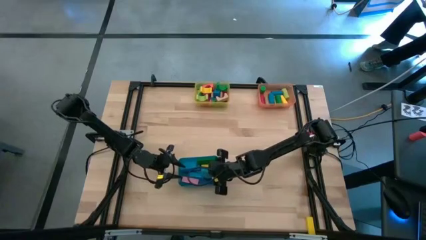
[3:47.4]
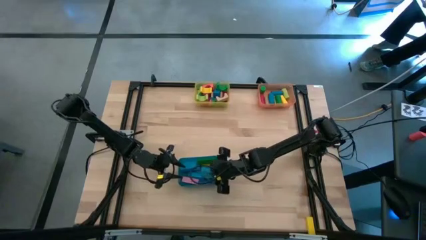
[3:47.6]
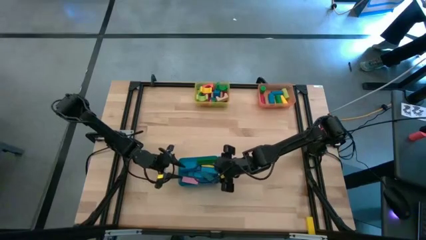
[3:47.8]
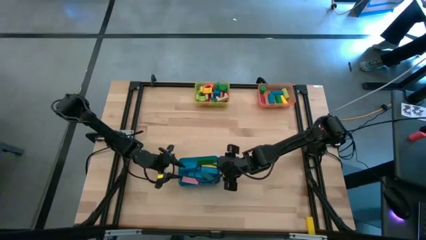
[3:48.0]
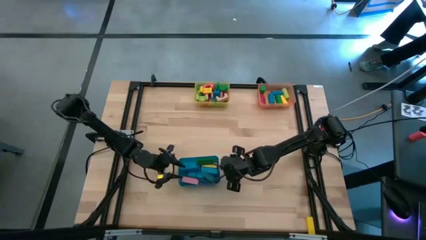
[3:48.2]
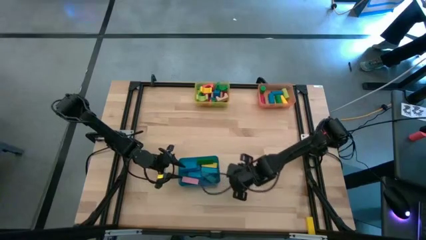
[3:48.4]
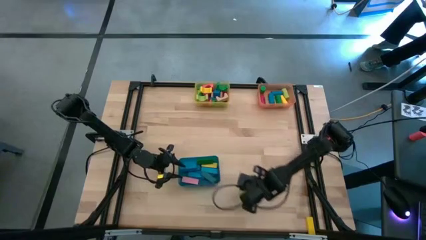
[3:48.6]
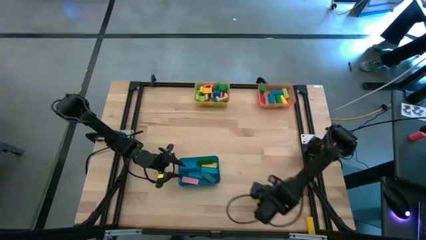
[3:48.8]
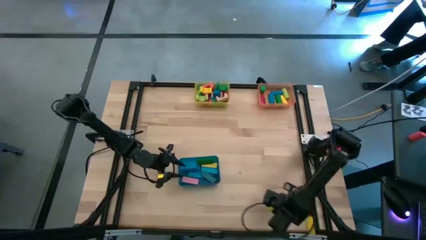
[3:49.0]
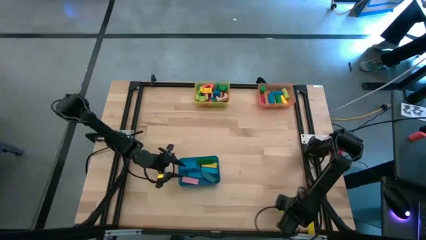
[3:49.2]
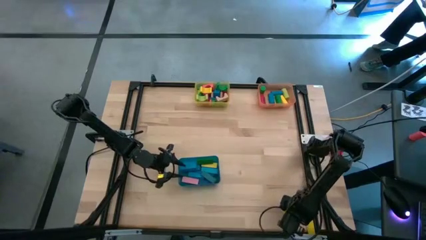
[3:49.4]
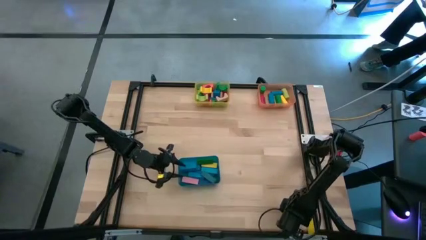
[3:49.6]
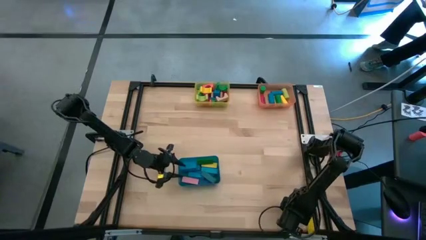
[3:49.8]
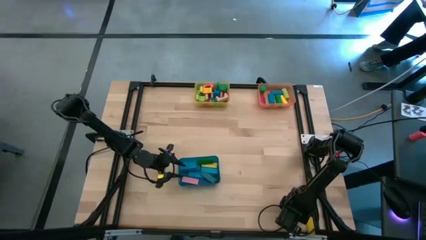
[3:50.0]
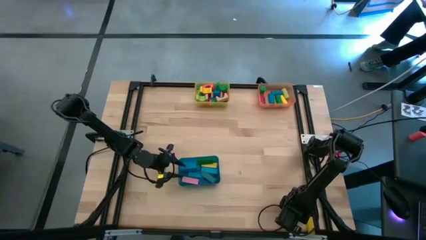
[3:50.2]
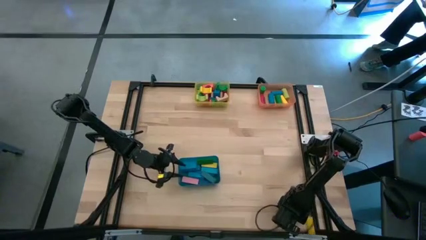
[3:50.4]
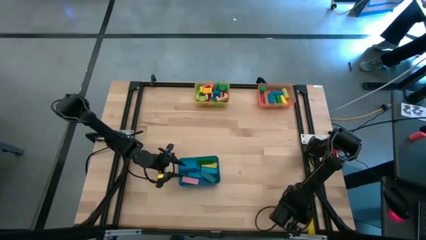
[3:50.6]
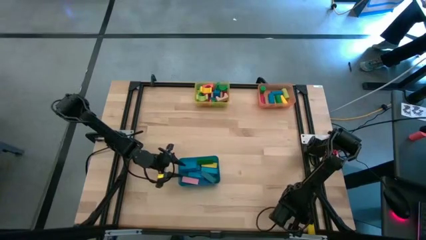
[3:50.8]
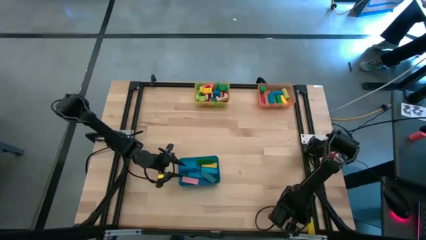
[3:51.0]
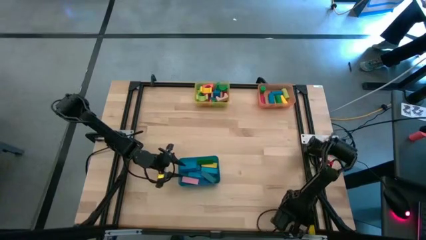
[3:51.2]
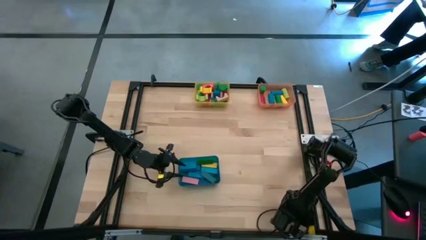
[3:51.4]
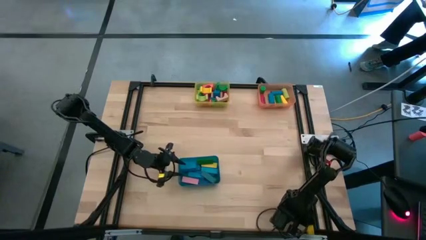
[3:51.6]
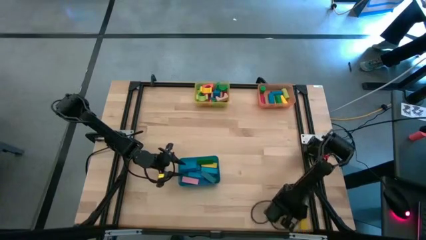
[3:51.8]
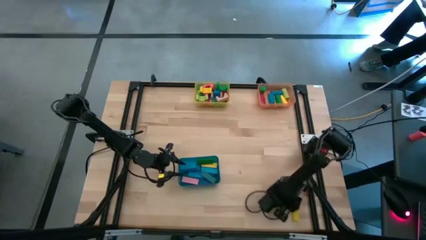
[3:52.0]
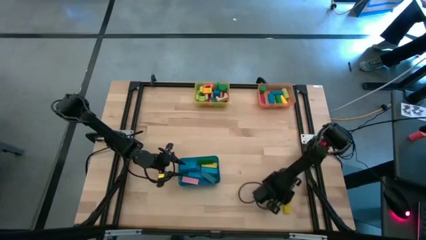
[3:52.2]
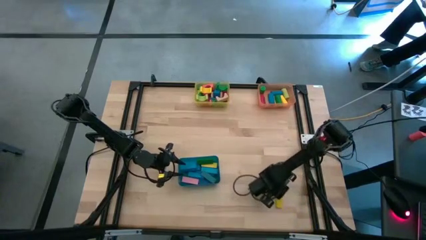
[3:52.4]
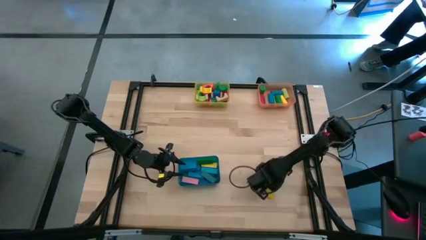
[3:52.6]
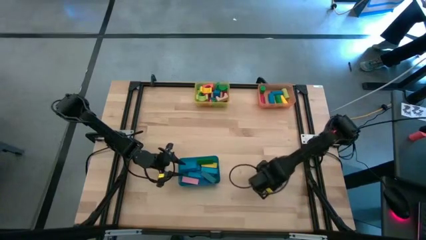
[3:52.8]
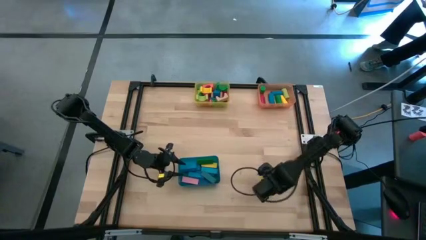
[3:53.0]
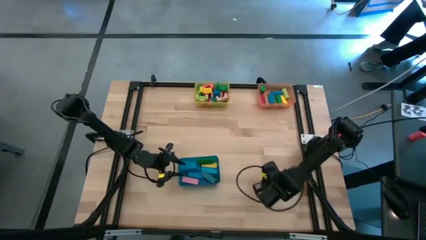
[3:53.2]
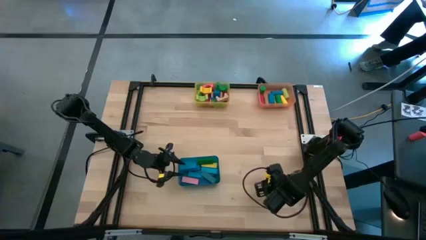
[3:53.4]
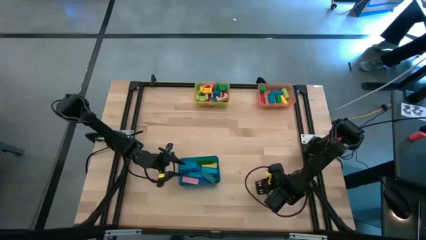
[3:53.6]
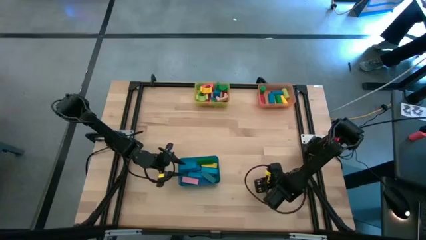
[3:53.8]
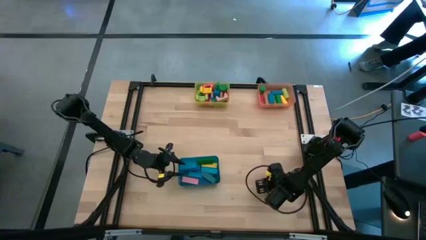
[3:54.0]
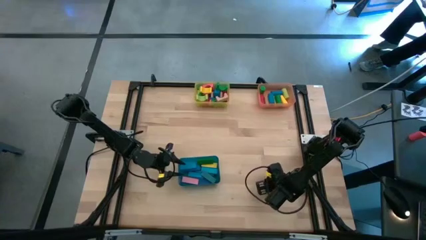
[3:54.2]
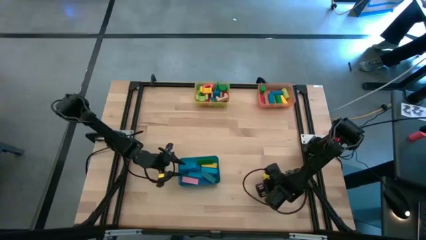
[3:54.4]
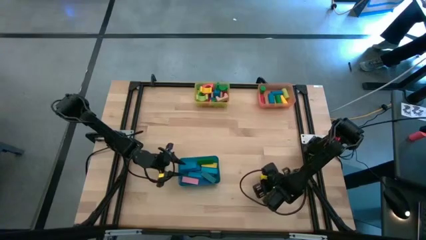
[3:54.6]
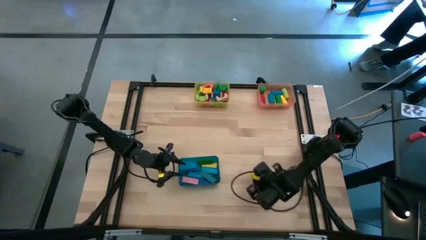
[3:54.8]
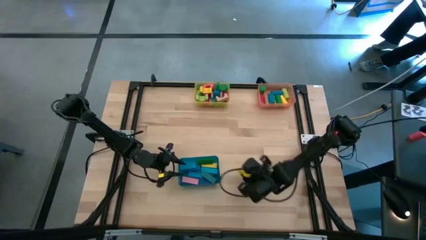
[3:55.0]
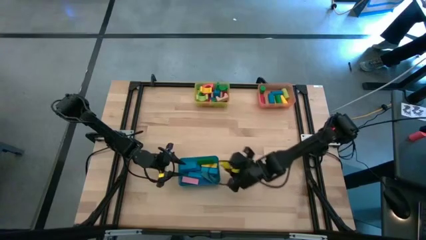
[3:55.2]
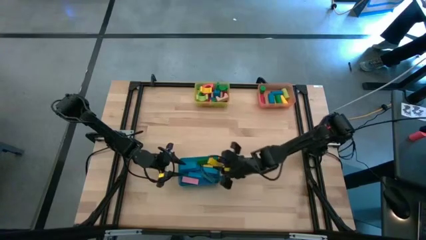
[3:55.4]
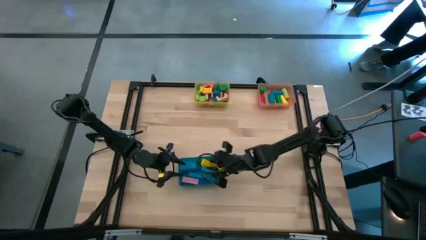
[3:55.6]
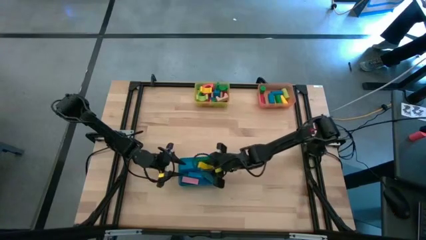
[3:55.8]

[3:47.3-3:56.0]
Task: Sort blocks by size
Put the yellow rectangular block into the blue bin

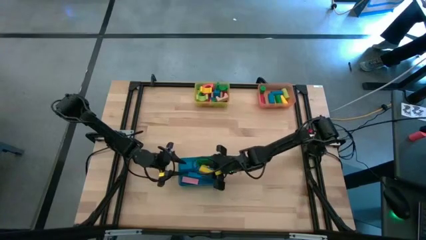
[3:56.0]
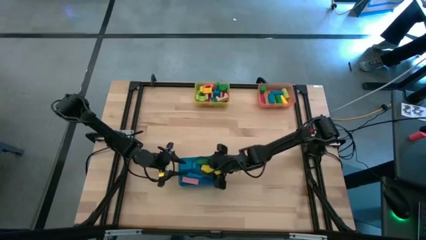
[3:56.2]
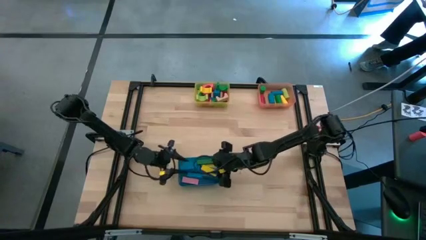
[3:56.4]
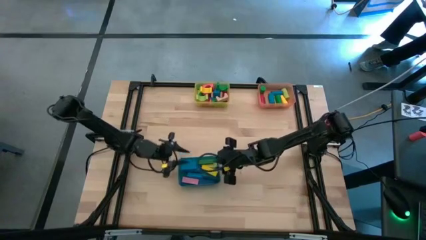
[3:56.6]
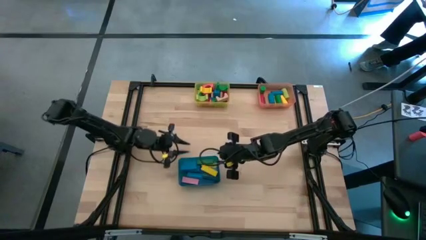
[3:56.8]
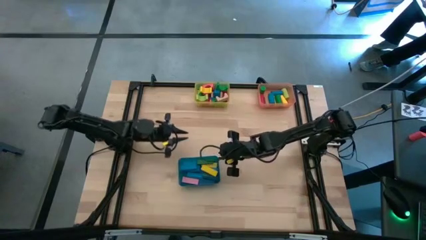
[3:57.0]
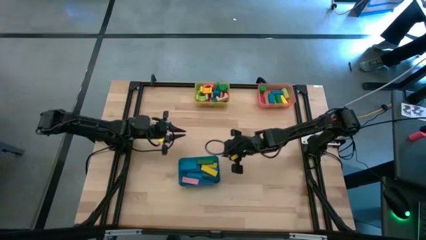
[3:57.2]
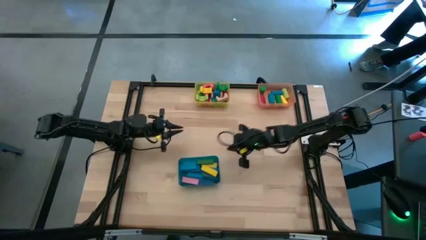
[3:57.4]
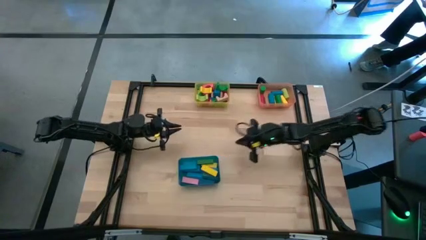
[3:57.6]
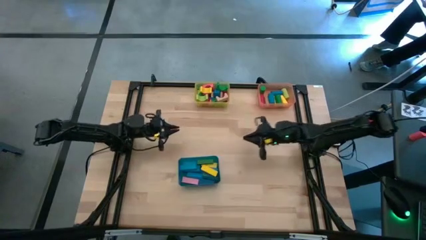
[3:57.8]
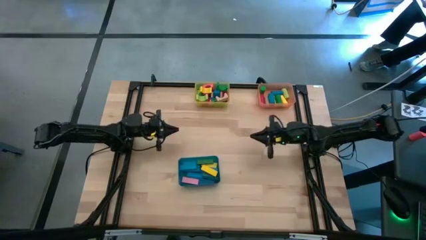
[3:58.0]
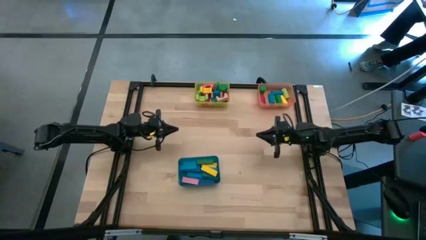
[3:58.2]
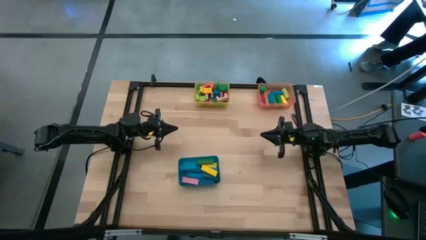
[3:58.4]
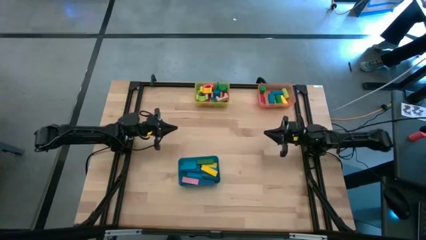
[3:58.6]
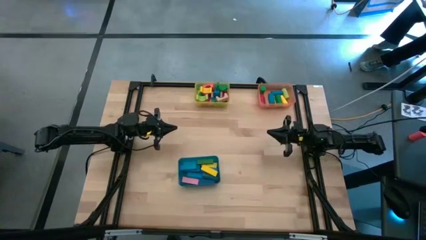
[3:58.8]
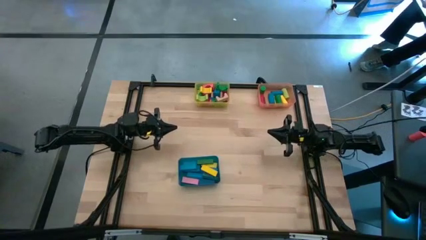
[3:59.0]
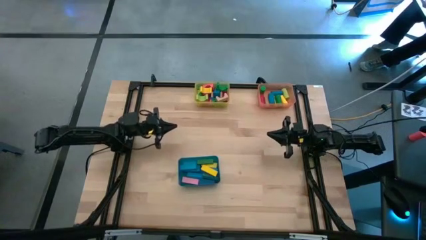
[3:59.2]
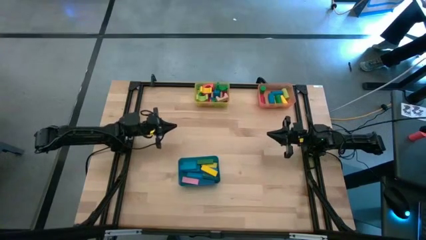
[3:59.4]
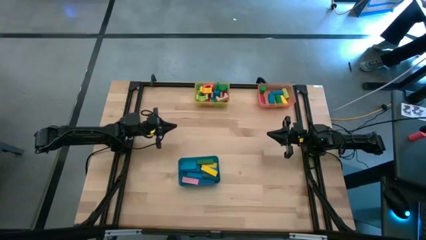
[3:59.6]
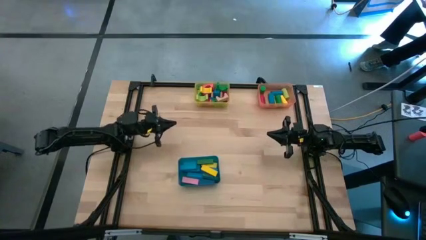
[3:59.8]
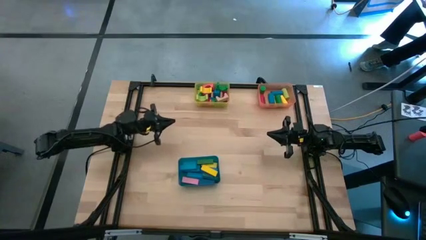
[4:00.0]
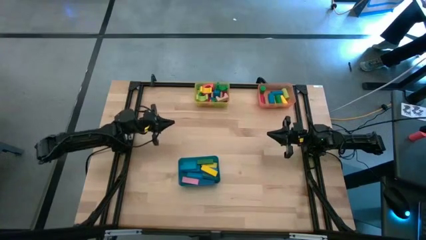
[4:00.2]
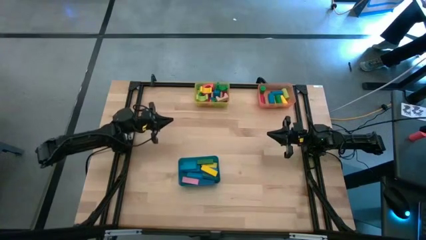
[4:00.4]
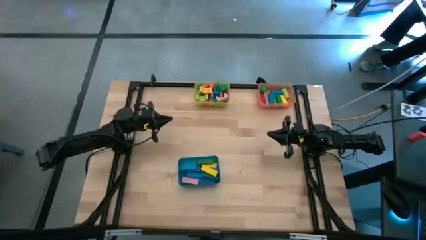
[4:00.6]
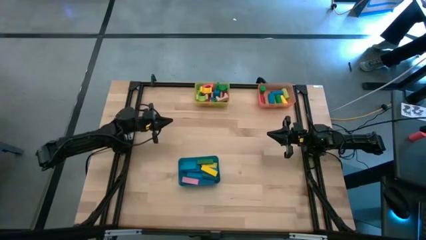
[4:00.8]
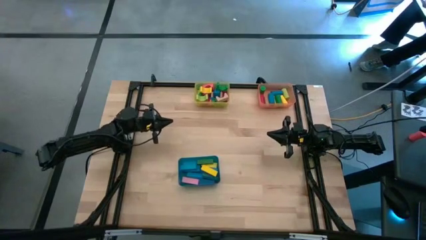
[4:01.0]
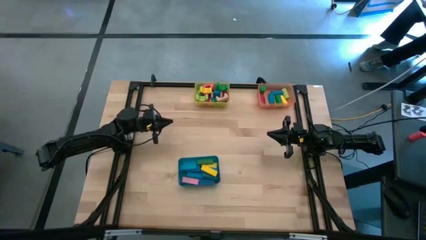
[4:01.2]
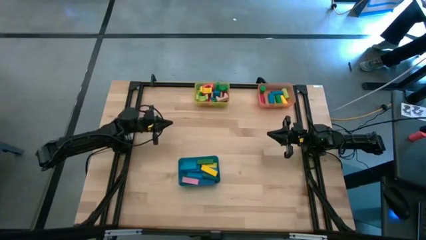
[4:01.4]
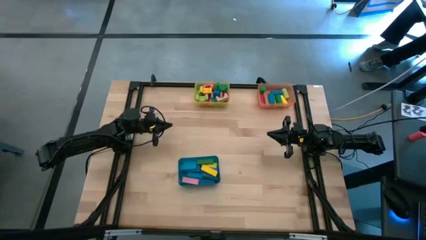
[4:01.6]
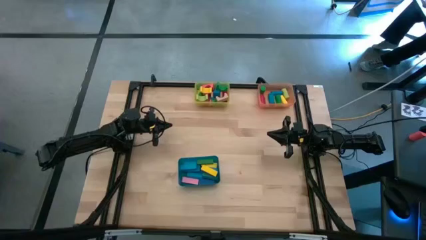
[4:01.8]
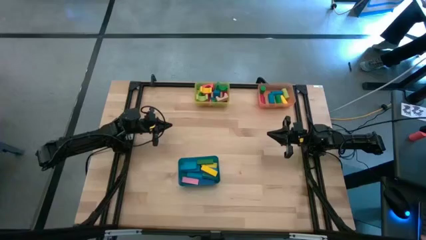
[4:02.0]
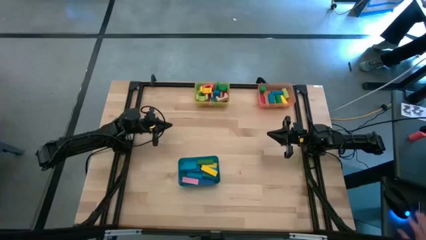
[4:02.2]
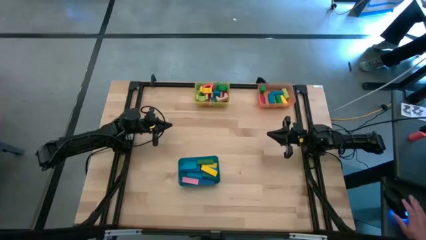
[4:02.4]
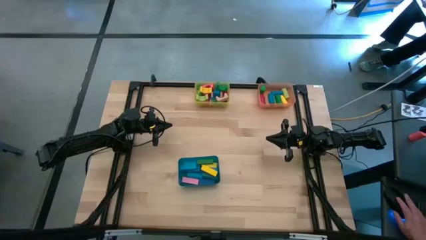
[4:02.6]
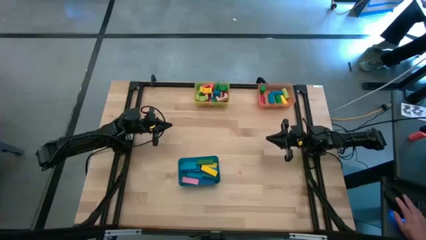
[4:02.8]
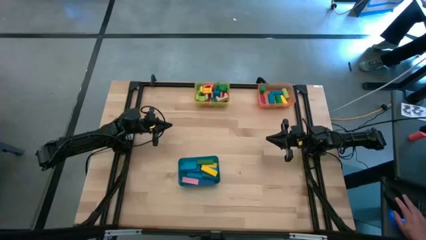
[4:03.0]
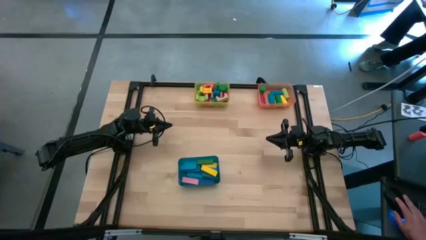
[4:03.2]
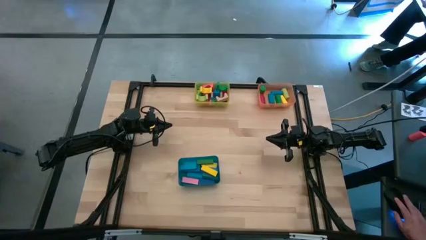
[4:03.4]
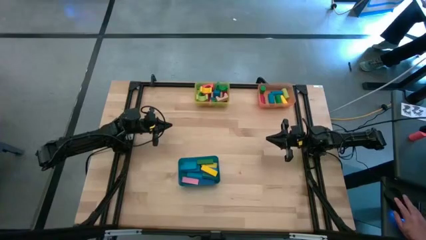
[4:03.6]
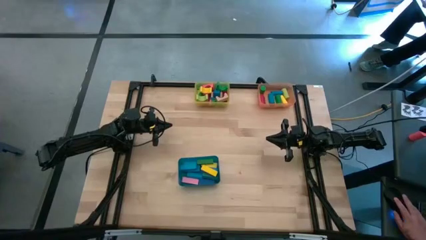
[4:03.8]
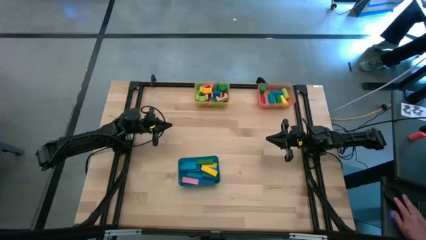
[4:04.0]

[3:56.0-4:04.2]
Return to Home Position
